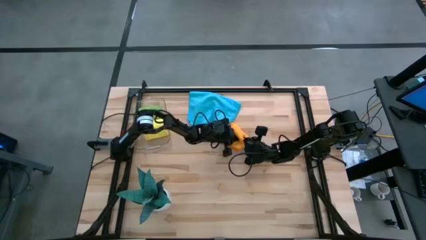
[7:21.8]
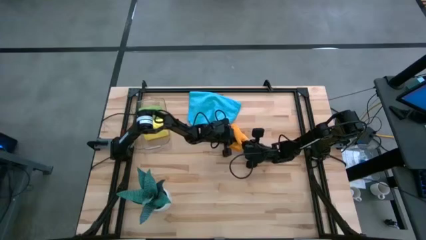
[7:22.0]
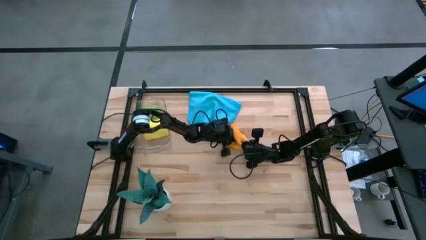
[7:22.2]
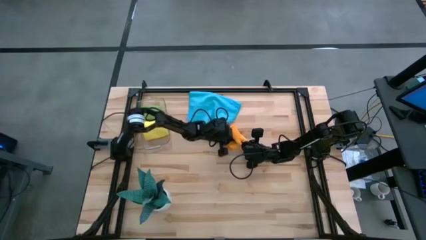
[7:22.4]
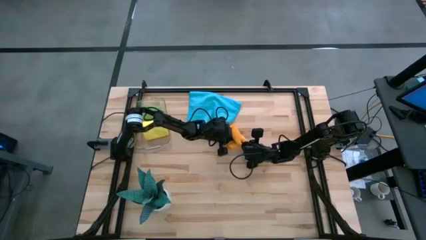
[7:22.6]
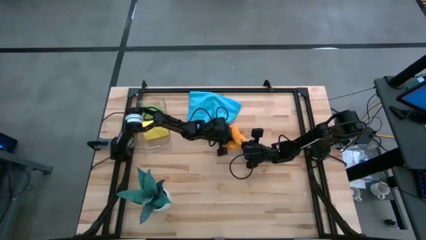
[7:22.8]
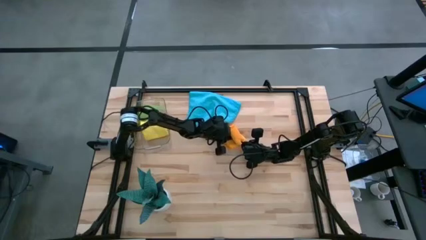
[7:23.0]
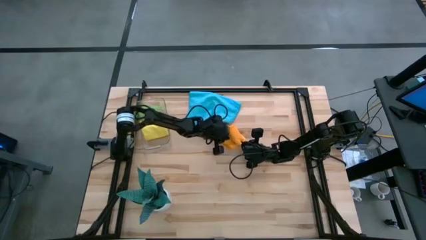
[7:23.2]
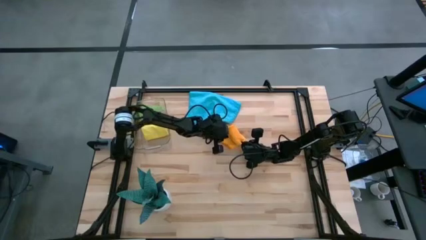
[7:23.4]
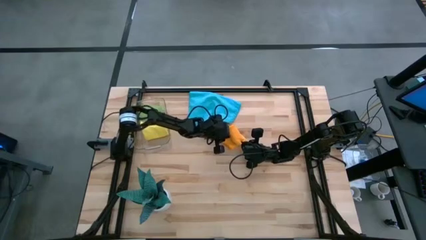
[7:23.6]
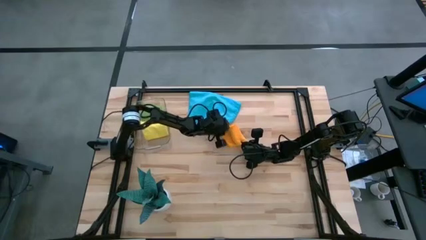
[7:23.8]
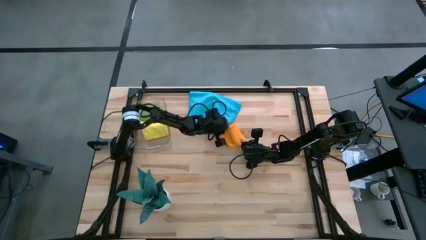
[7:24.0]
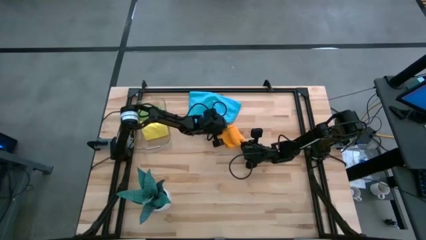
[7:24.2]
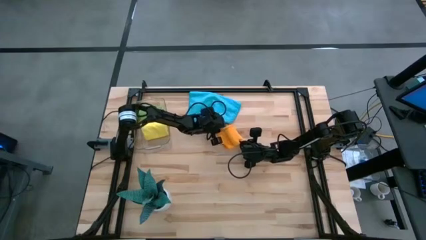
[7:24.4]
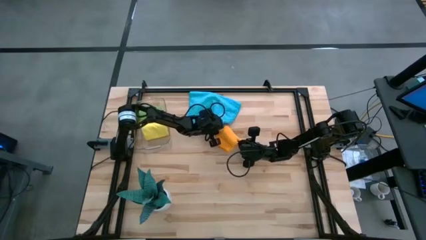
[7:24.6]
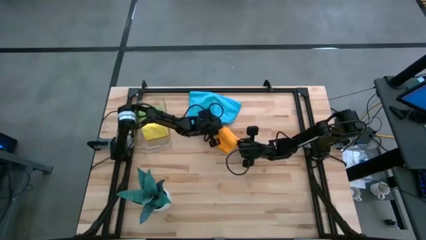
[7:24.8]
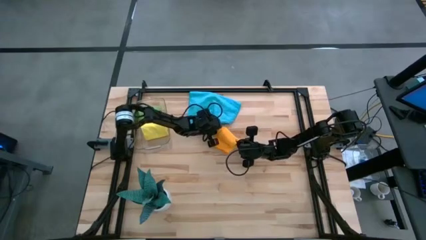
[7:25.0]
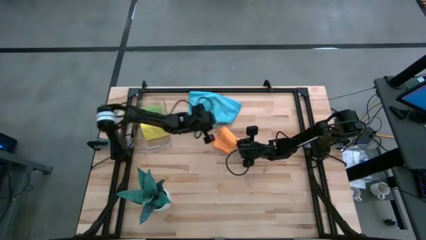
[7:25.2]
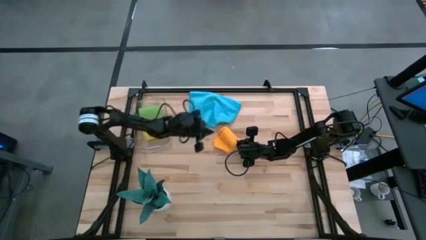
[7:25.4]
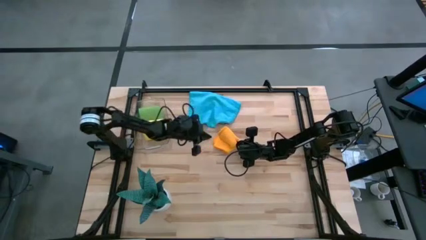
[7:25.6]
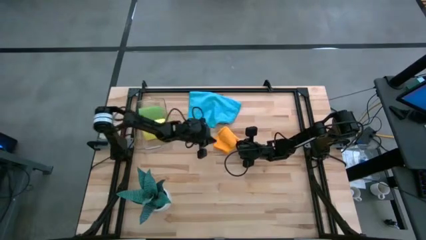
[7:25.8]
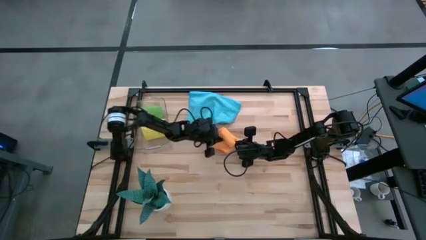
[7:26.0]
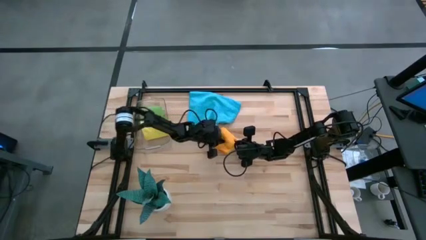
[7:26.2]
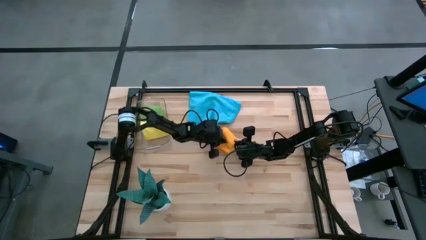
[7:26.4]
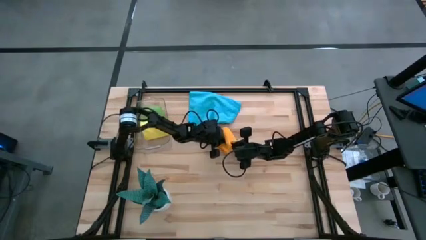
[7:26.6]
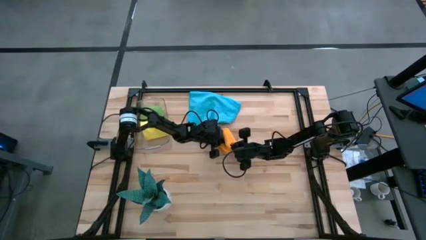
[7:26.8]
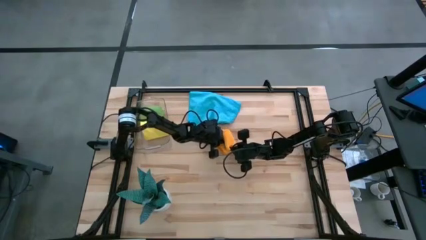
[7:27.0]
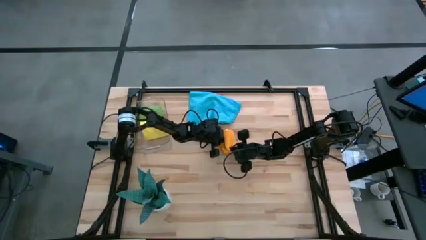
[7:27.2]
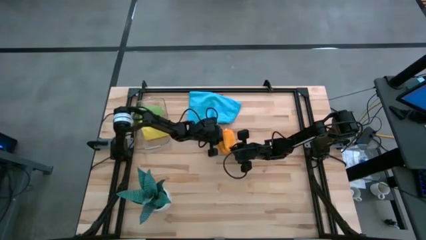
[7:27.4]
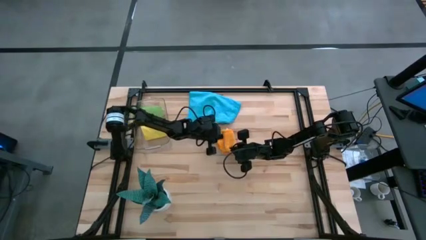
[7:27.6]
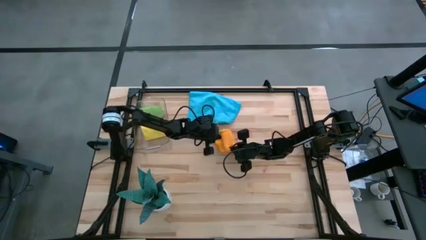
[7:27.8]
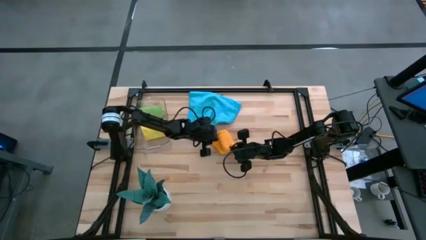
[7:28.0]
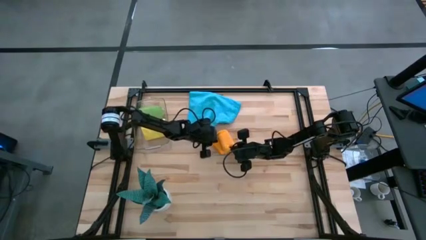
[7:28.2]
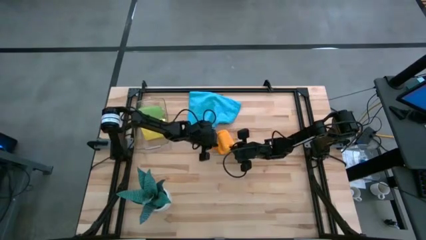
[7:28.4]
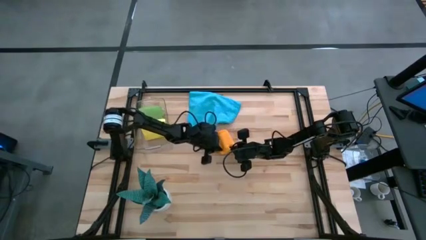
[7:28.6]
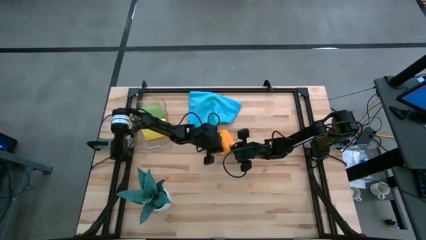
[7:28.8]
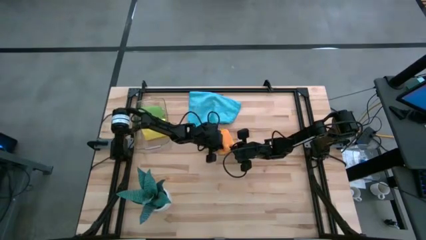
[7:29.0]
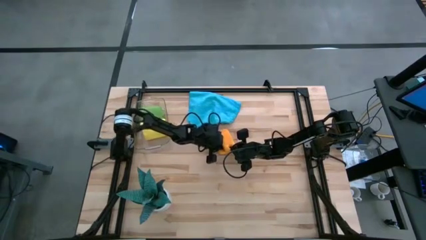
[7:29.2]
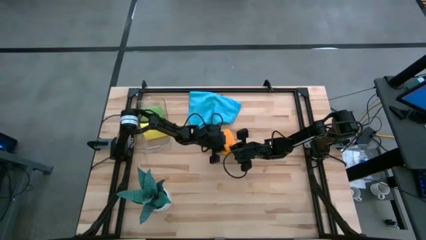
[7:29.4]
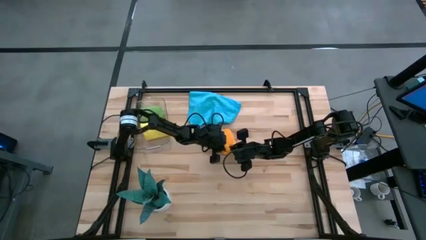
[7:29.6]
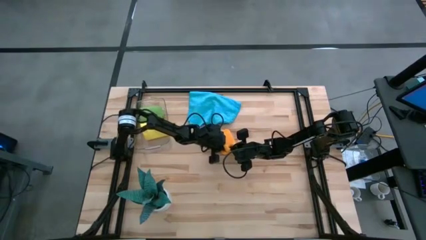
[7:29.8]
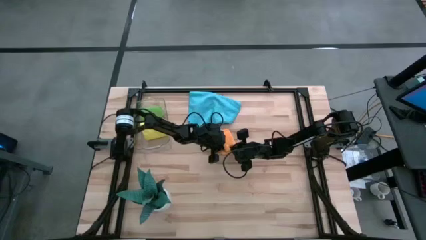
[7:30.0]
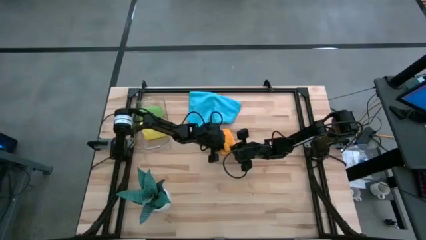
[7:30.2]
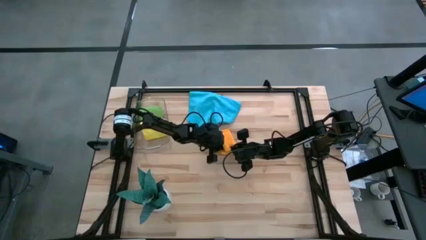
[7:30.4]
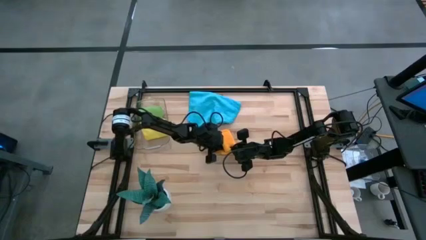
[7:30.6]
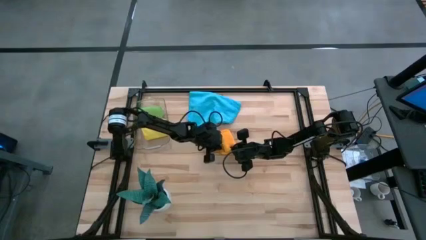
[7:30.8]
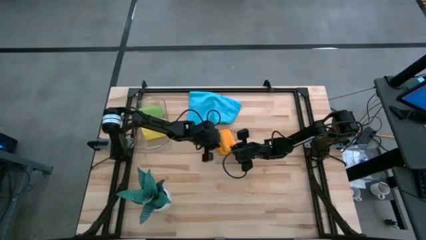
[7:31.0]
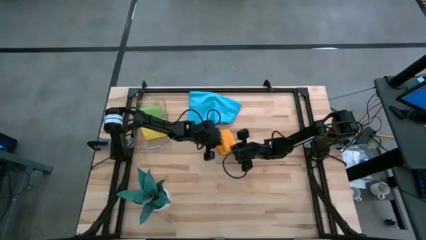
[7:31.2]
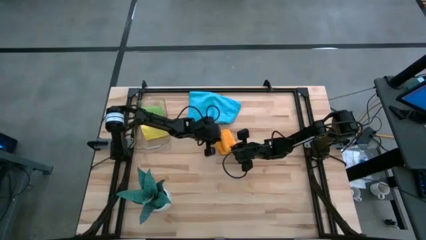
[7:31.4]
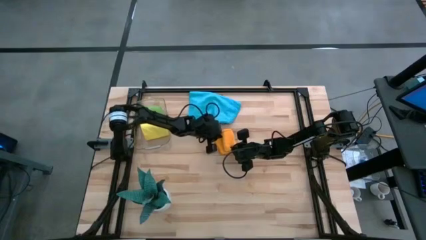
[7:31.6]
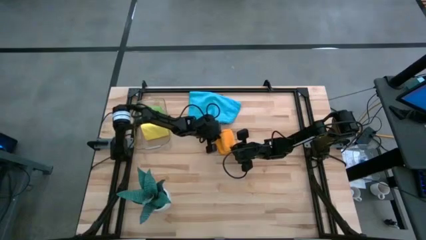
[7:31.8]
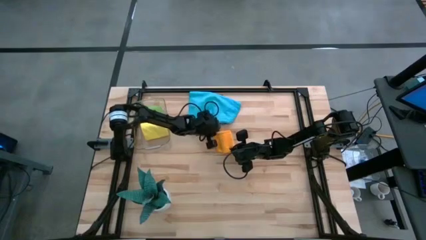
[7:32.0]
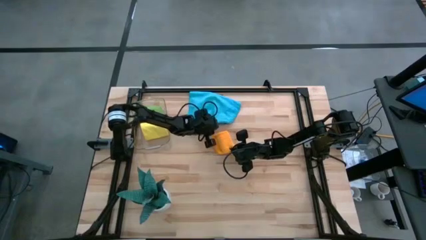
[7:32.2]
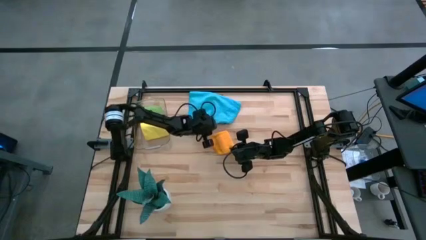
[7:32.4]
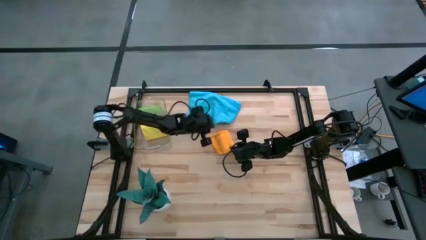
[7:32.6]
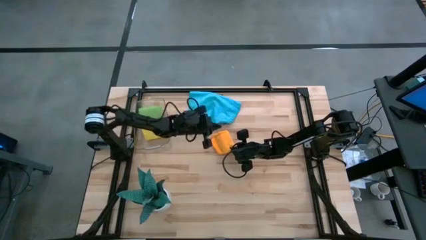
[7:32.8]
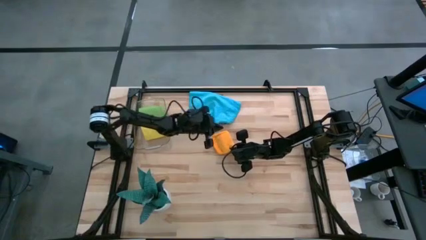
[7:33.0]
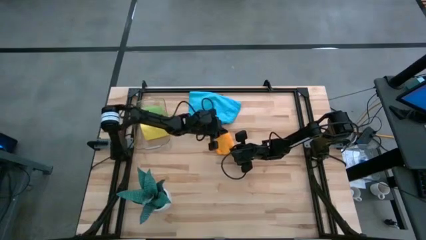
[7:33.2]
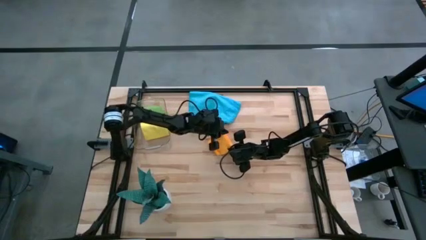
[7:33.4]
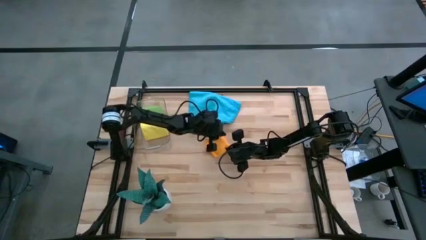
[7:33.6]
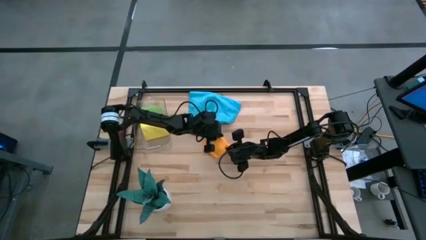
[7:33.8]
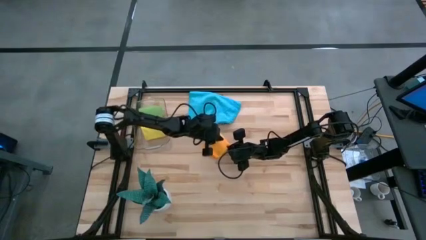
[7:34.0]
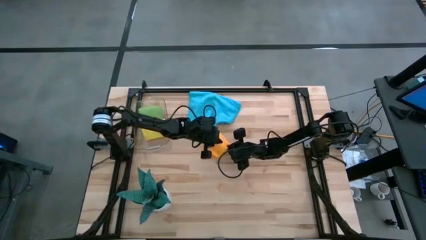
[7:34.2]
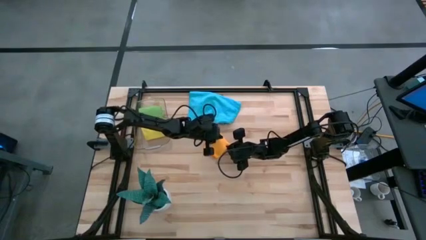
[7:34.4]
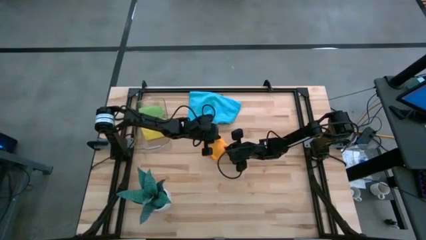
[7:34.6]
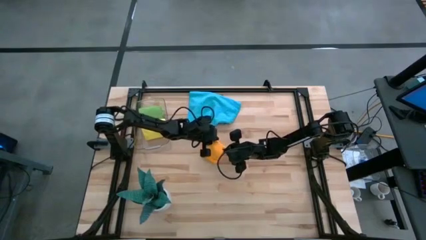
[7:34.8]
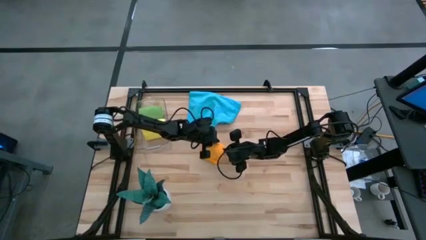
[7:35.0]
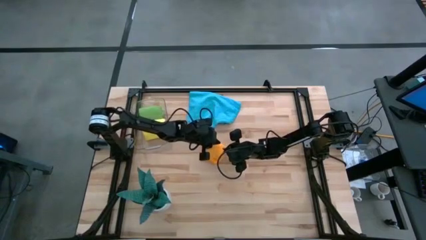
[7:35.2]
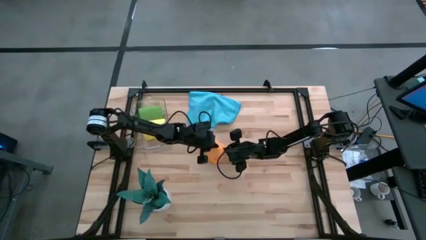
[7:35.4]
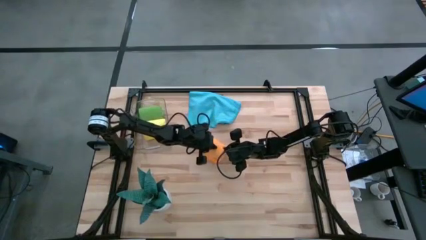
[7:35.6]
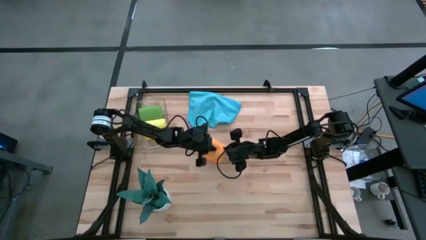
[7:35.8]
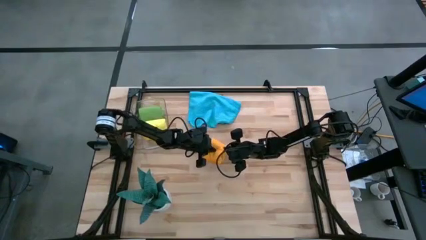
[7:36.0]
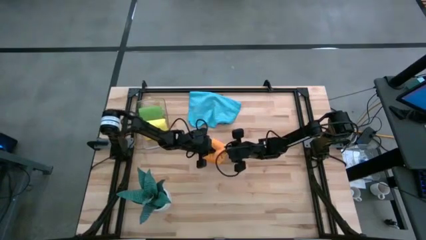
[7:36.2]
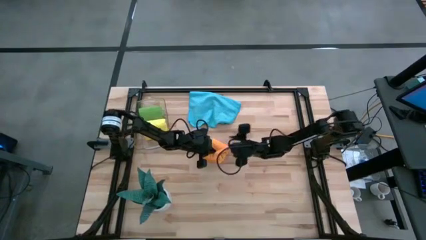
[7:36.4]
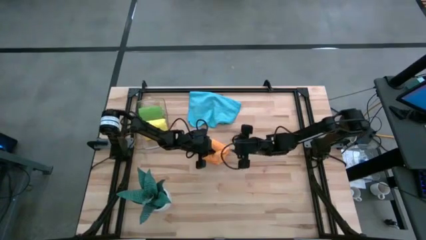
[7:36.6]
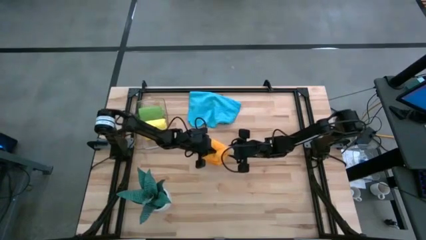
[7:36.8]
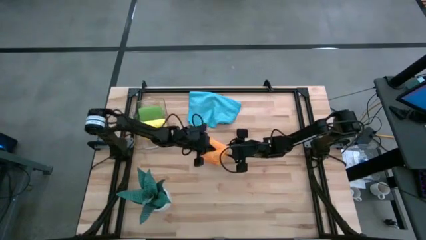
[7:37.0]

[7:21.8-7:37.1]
Task: Roll microfiber towels into tight, uniform cylinder then place into a basket
Roll the orange microfiber towel

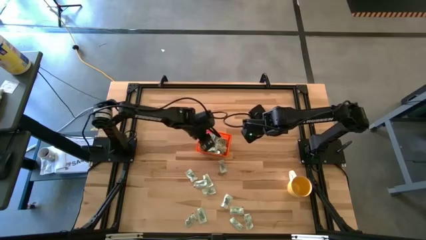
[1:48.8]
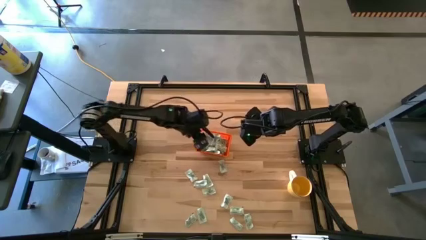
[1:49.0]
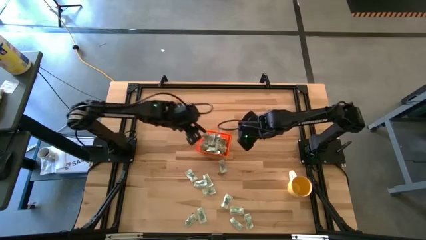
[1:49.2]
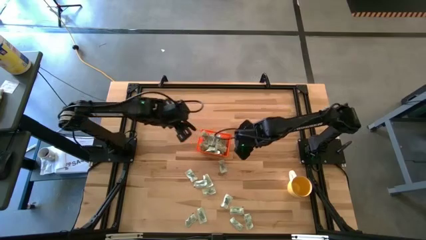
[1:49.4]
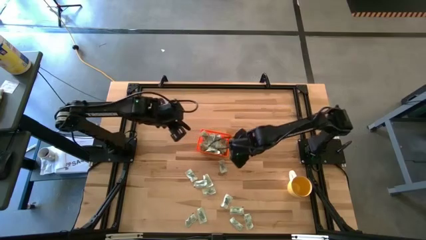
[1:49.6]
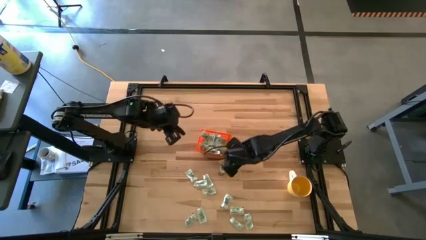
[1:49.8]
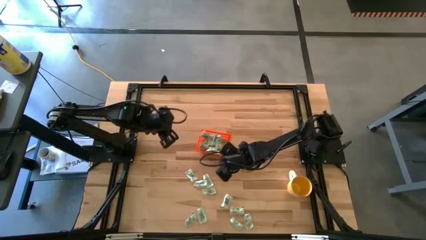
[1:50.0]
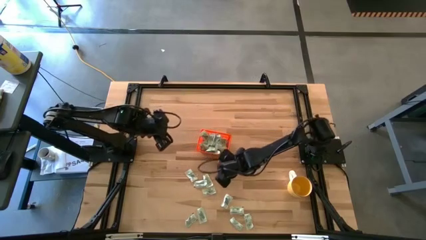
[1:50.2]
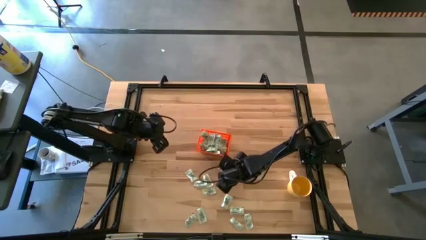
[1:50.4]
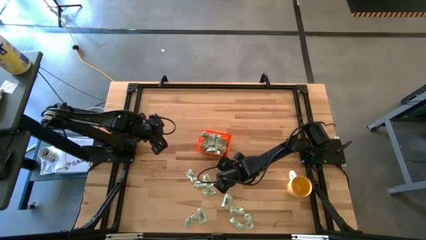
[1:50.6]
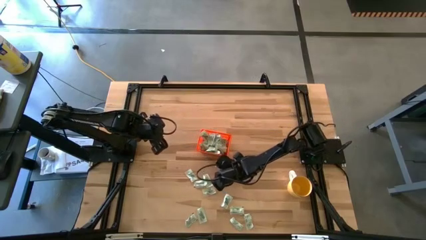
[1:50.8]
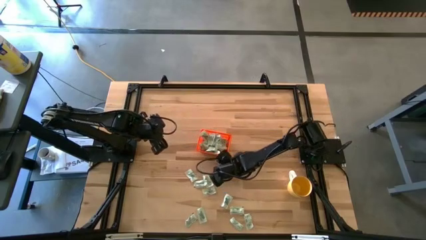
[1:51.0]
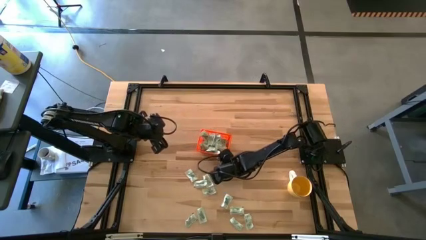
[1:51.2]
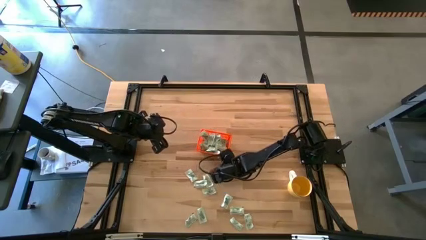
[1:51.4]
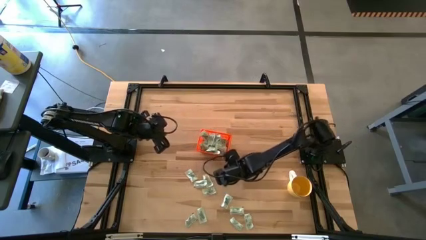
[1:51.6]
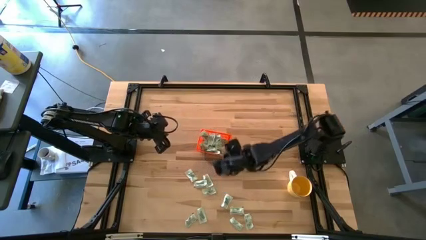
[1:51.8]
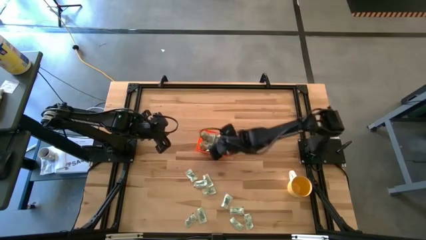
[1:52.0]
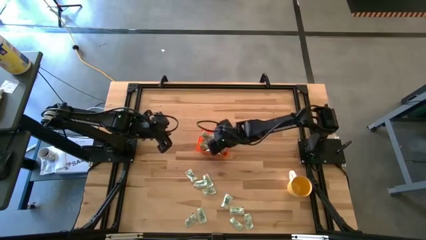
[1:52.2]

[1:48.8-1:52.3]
Task: Pick and place Stevia / Truvia into bins
Put the light green stevia packet into the orange bin
